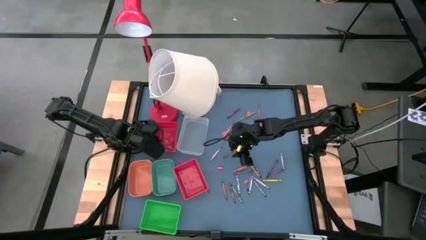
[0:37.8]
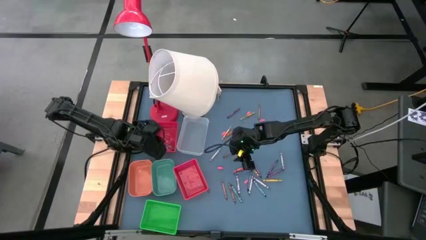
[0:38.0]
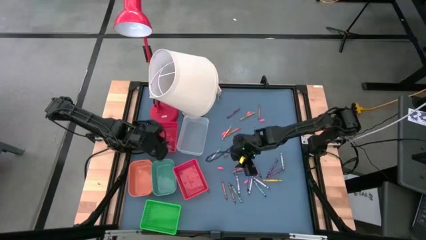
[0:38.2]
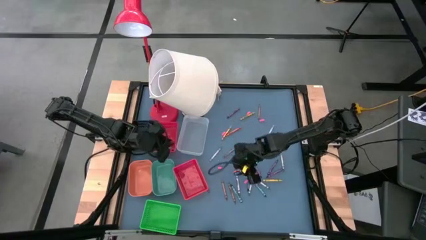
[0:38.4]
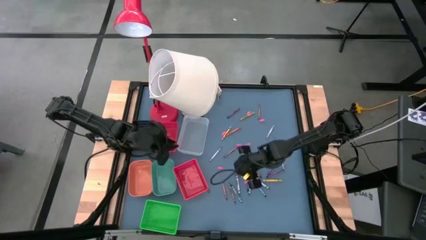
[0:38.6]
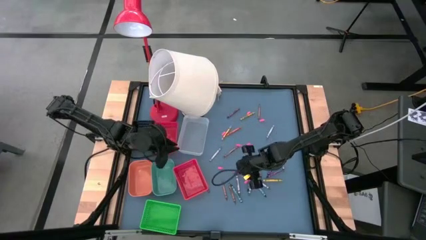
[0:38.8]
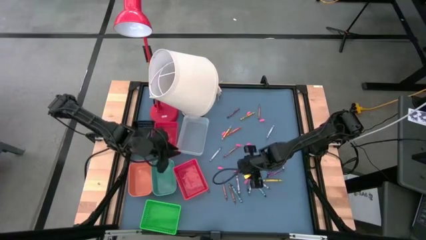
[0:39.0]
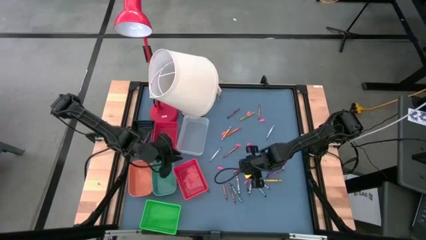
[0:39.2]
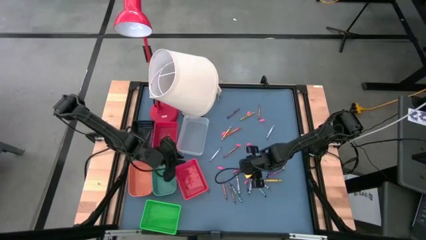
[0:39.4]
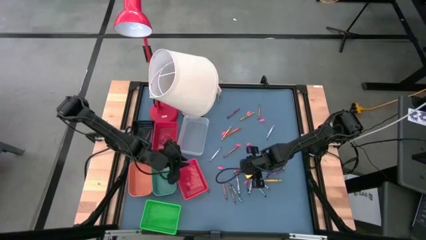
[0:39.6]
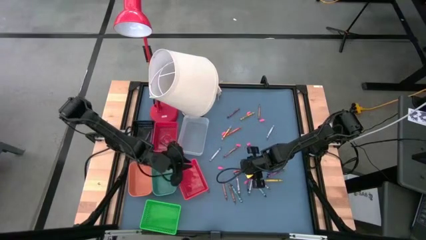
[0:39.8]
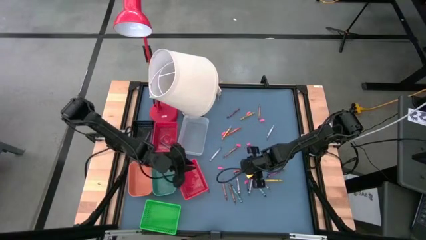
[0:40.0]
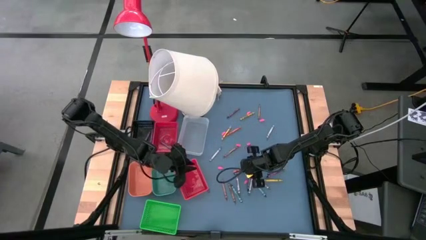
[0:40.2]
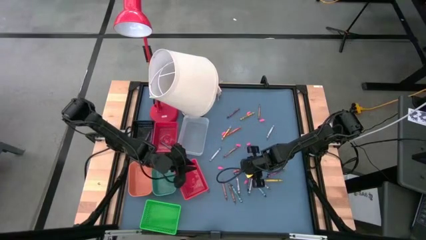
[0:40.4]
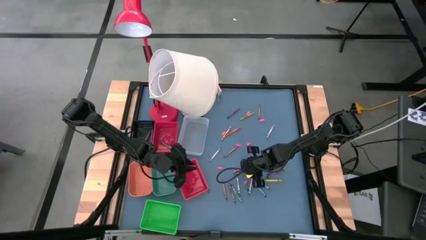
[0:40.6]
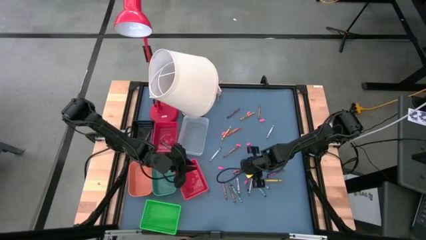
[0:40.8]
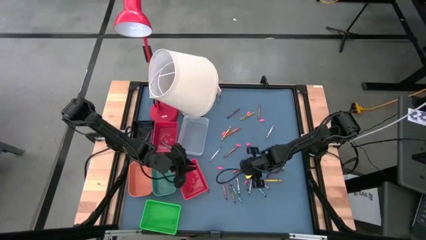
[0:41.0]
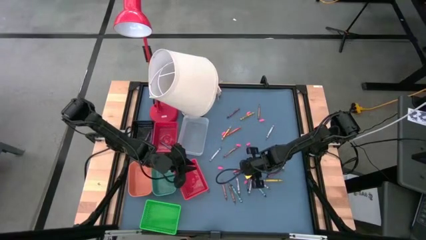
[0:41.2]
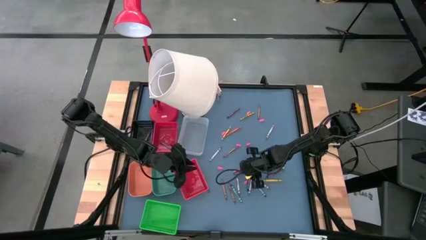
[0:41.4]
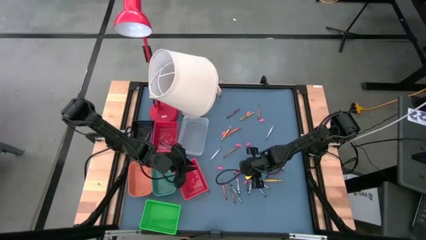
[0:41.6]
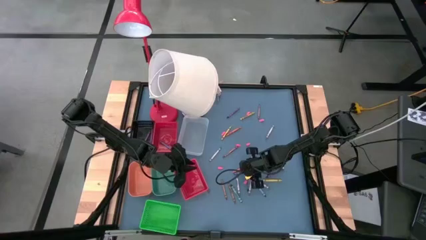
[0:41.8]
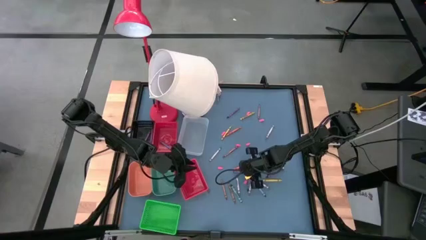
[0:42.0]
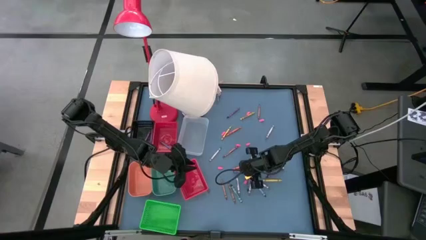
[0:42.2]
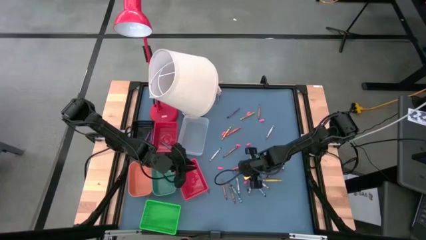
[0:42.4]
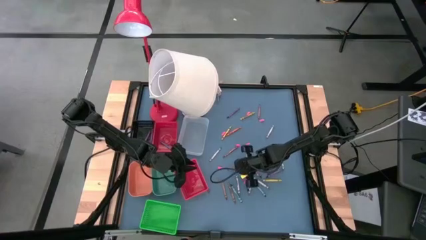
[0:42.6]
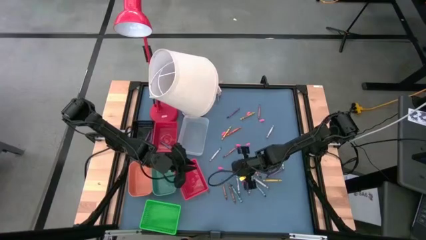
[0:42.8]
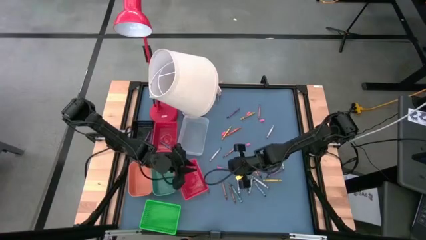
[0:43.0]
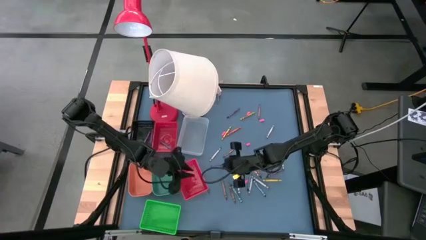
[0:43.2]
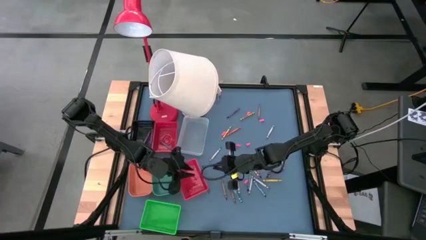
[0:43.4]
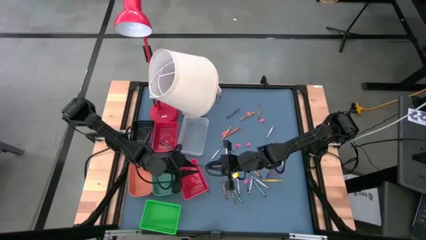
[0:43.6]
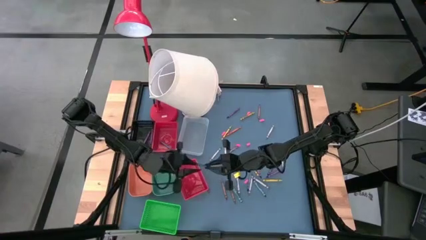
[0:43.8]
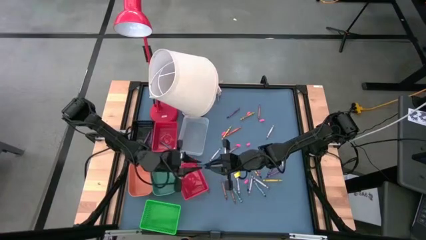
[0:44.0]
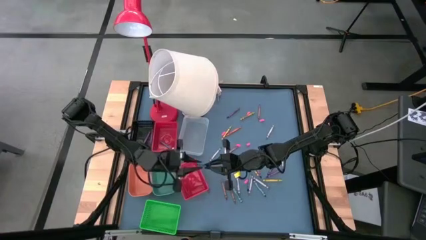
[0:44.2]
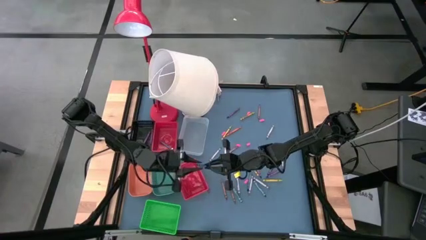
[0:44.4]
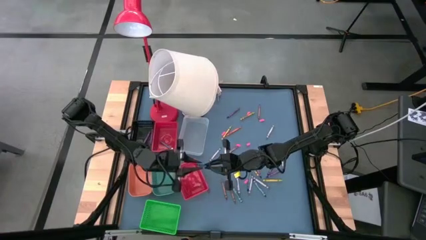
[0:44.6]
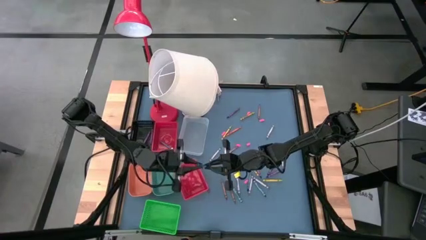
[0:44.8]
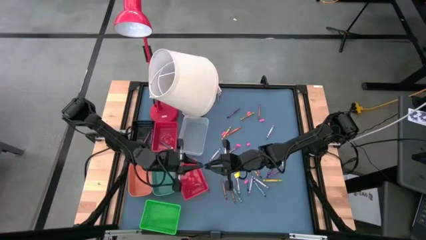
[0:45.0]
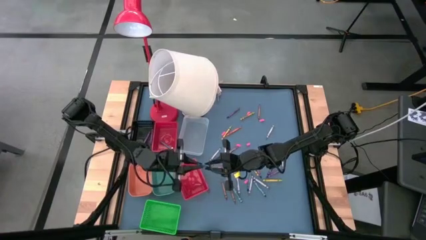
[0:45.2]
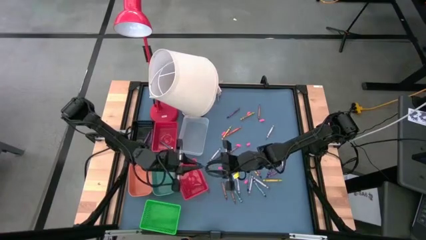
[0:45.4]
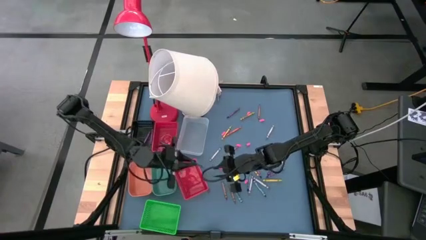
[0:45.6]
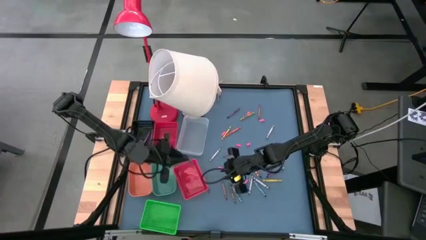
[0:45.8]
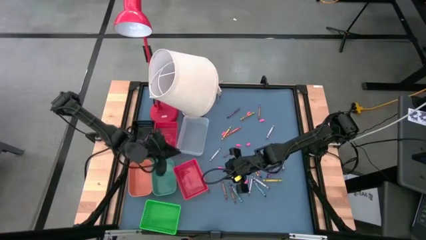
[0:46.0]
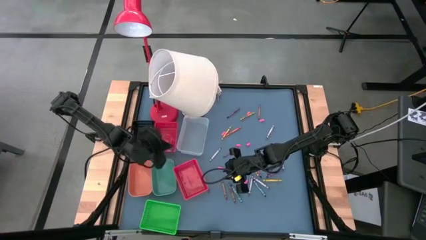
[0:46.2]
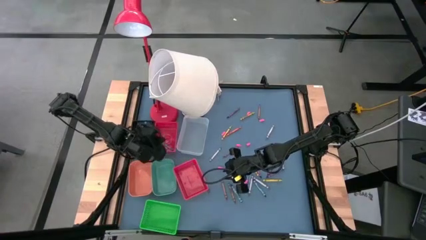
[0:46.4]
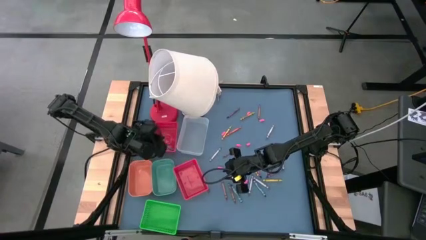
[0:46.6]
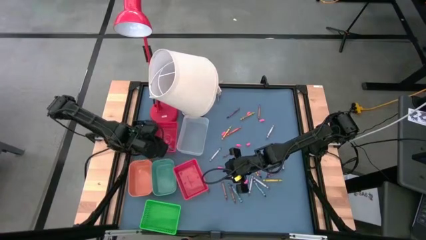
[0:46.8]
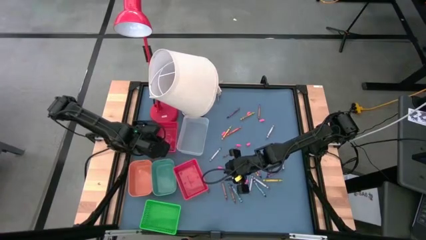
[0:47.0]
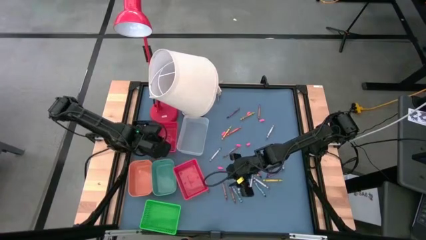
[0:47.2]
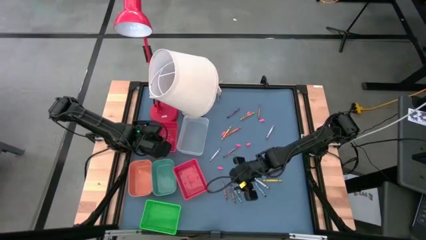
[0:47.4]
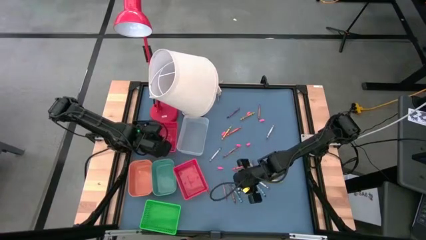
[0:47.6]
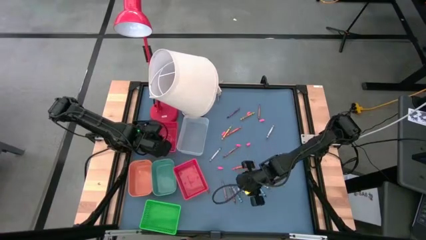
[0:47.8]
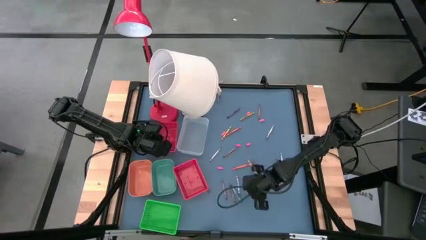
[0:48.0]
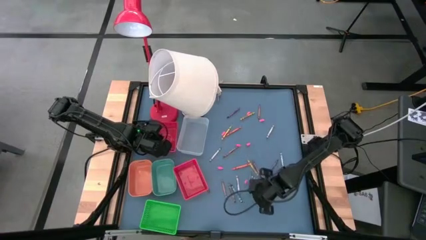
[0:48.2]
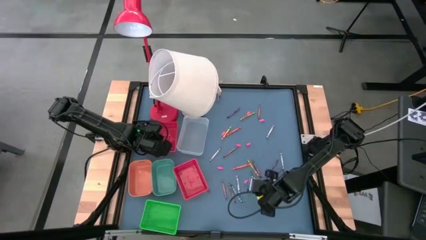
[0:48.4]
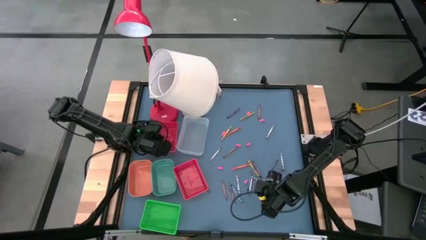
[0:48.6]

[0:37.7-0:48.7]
Task: Sort crayons
Put the blue crayon into the top red bin

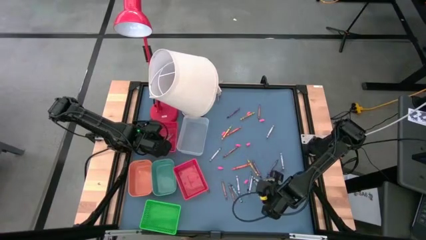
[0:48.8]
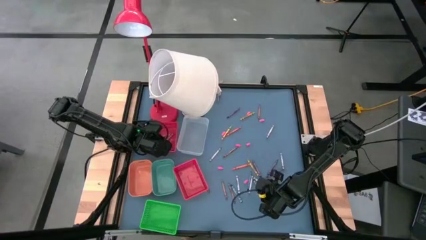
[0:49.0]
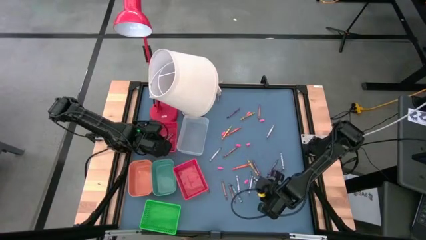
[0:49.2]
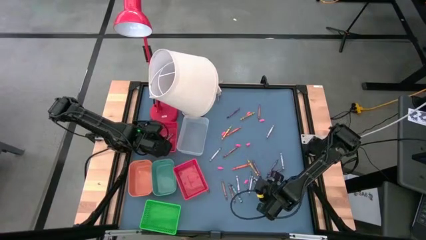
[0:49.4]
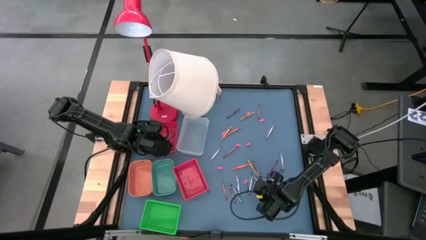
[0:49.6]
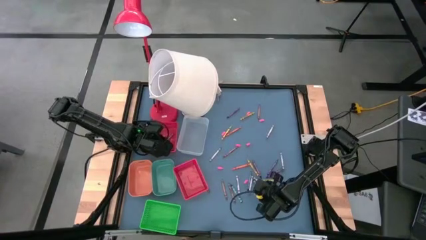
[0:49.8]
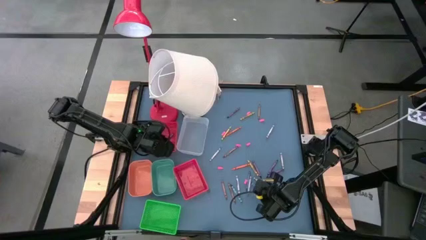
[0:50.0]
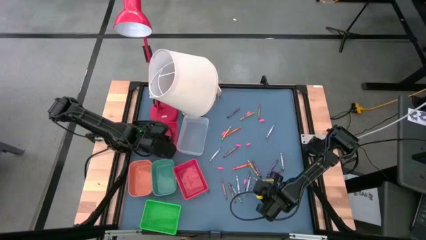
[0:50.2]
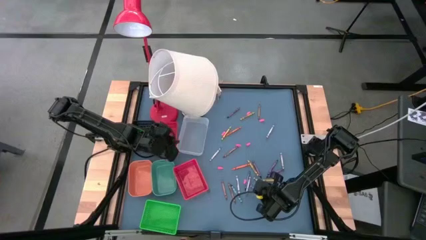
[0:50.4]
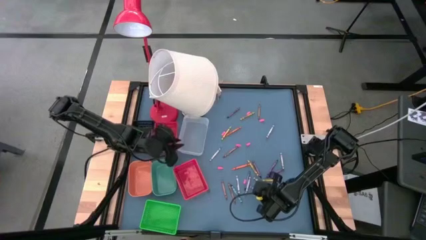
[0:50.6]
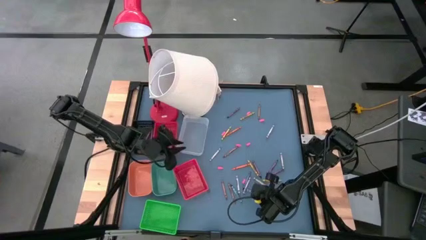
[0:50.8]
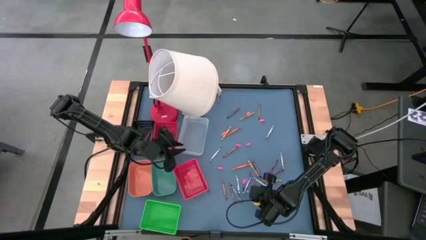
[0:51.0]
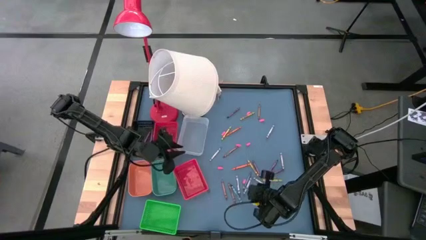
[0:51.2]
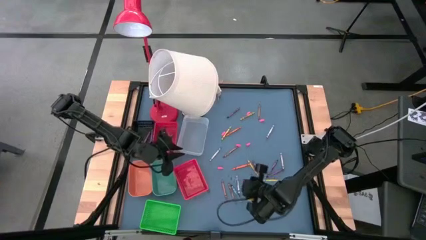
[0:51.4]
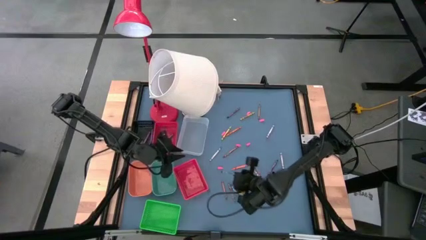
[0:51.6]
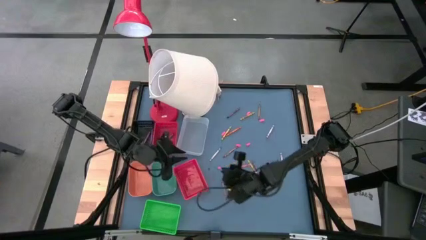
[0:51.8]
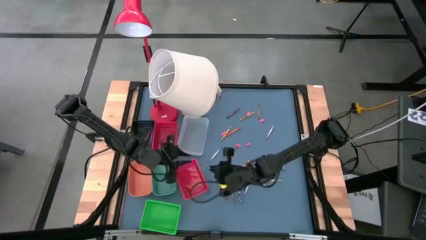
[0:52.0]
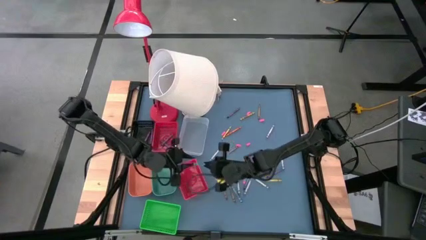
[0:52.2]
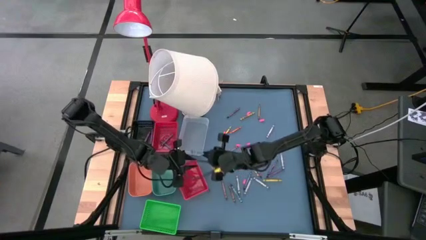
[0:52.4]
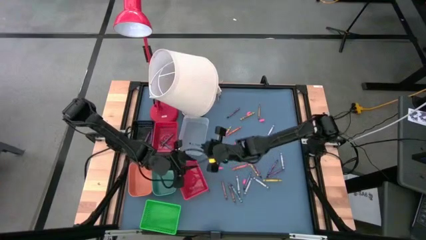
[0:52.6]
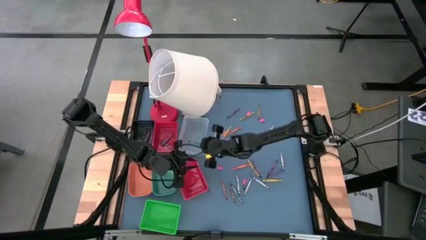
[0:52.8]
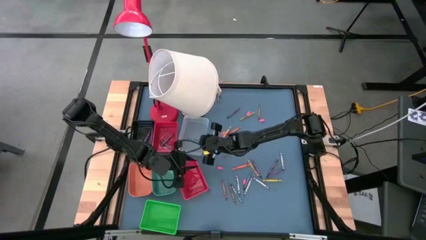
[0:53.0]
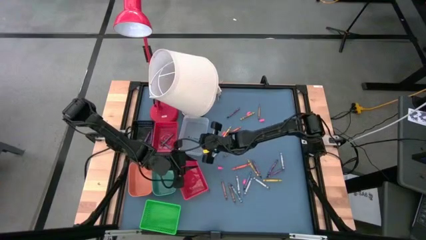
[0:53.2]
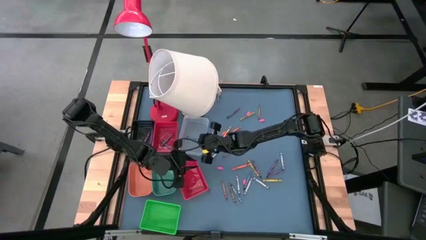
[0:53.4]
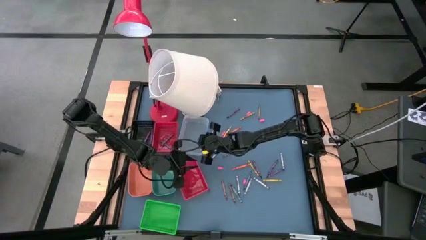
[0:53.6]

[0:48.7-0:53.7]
Put the light blue crayon into the transparent bin
